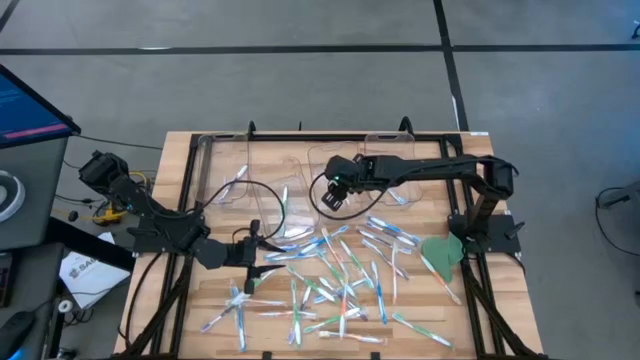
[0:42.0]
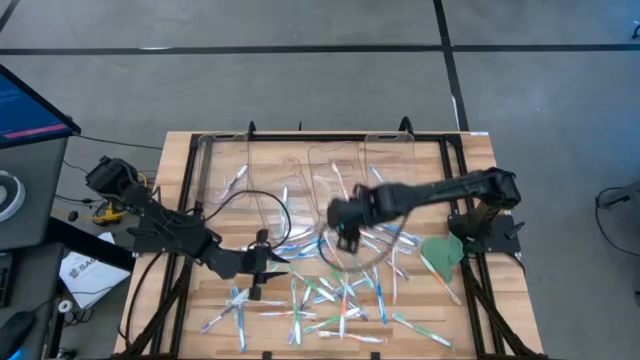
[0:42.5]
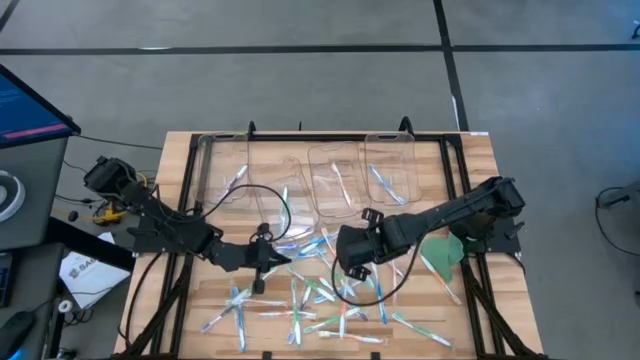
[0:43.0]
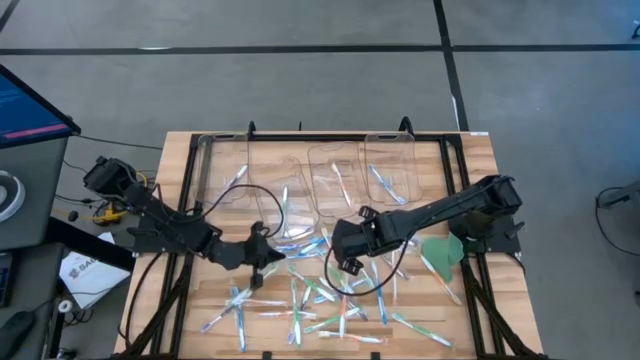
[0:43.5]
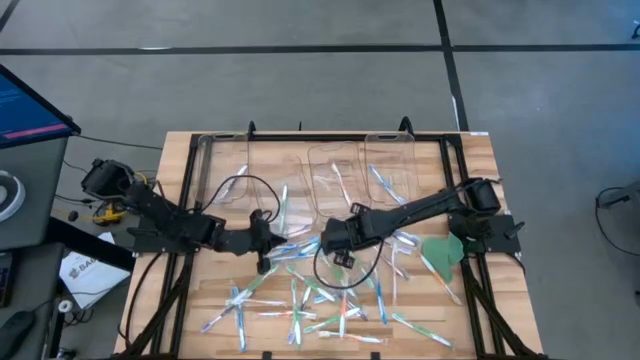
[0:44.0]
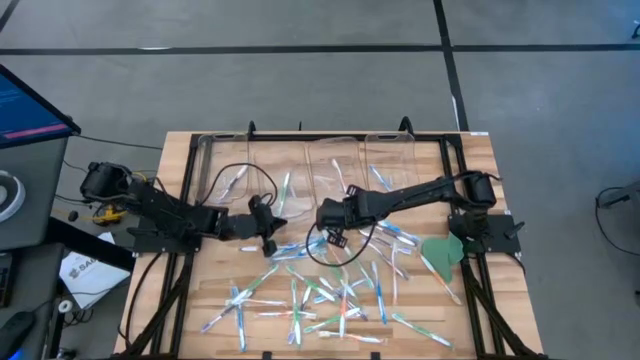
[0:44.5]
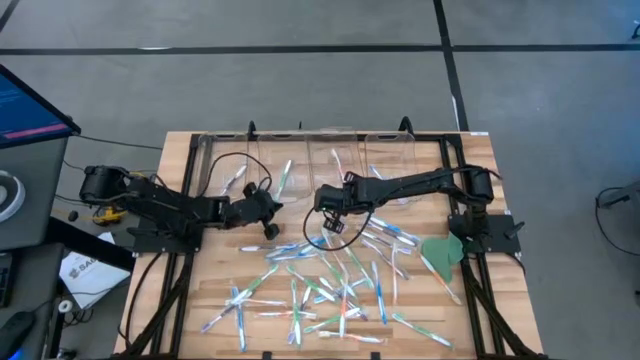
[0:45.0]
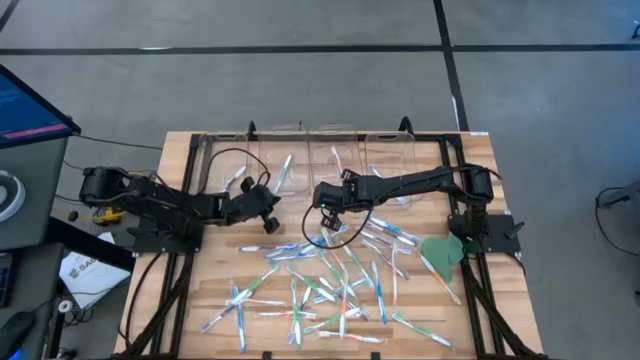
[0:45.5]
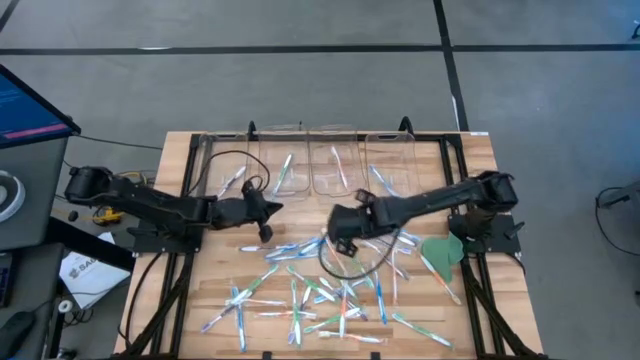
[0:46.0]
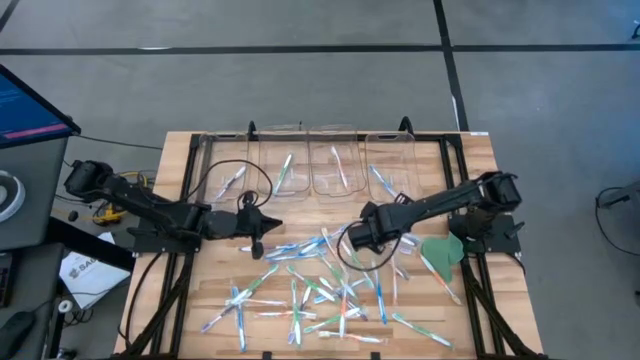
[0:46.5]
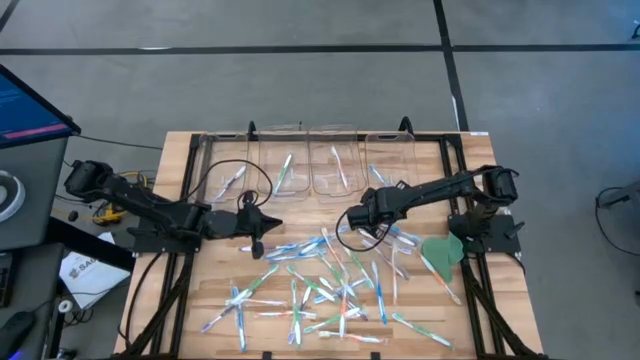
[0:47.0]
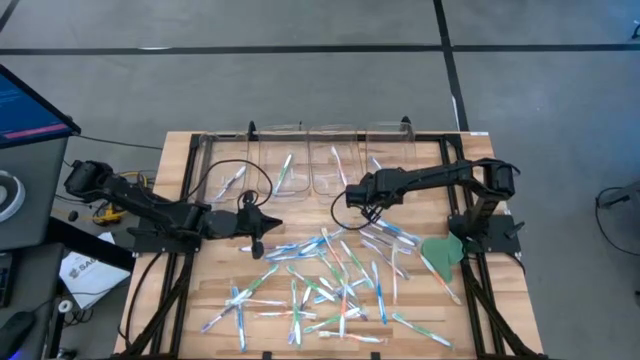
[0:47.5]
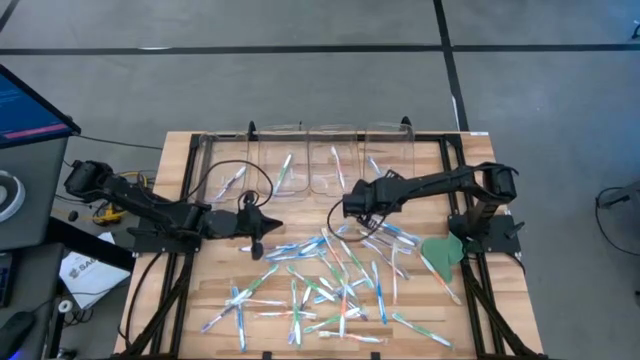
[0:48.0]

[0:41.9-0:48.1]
Task: Pick & Place Toothbrushes
Adjust the transparent bins

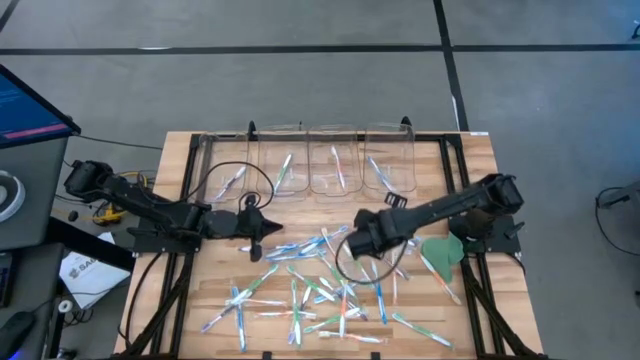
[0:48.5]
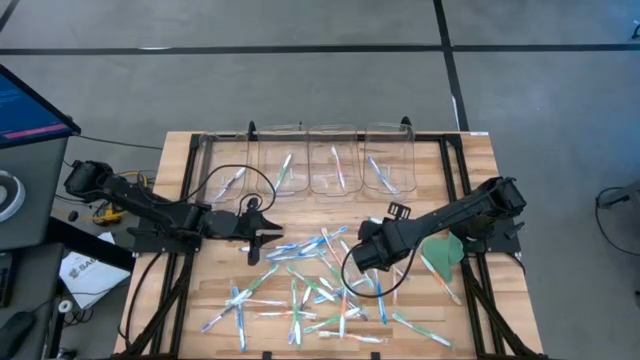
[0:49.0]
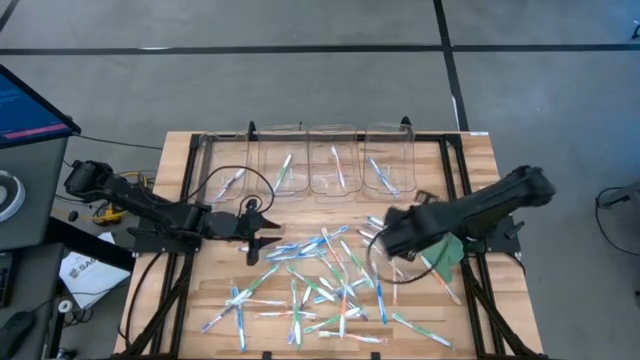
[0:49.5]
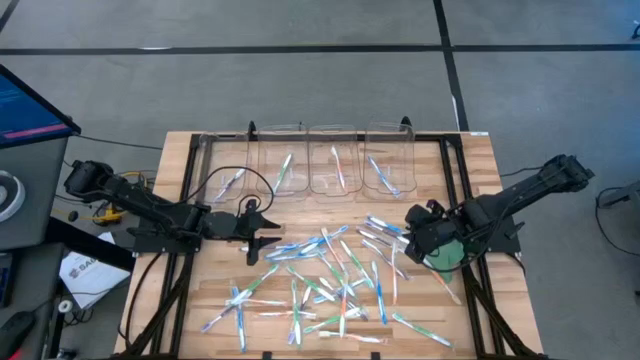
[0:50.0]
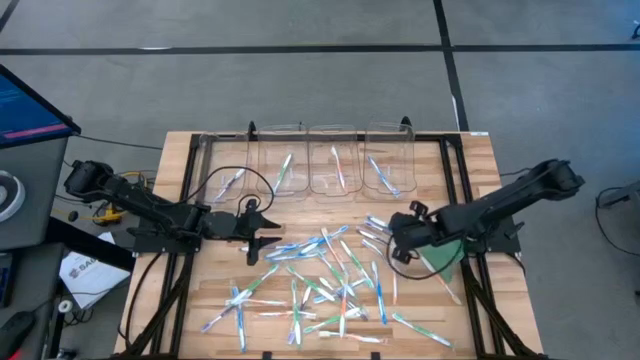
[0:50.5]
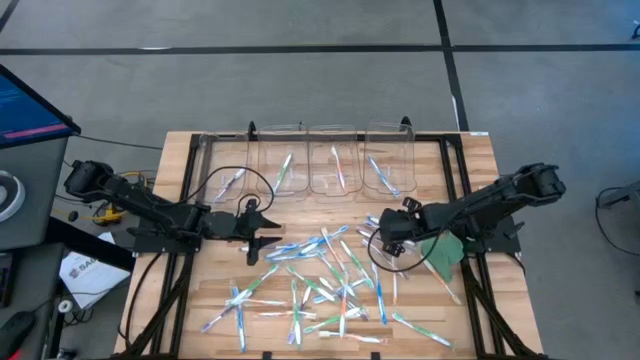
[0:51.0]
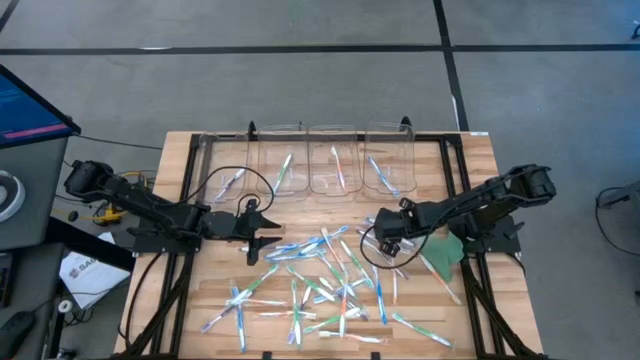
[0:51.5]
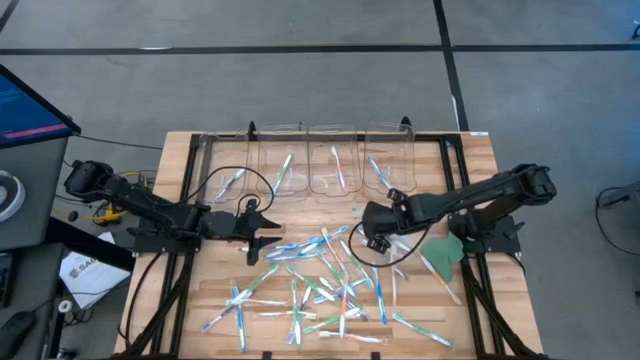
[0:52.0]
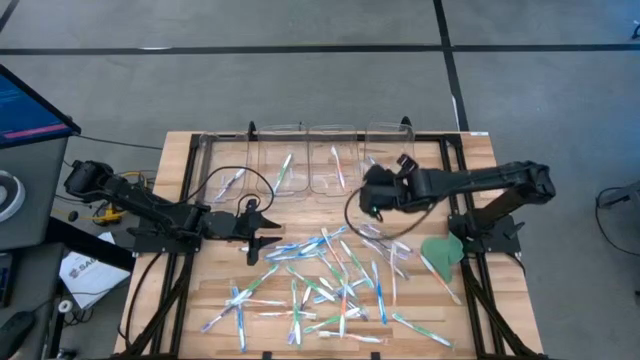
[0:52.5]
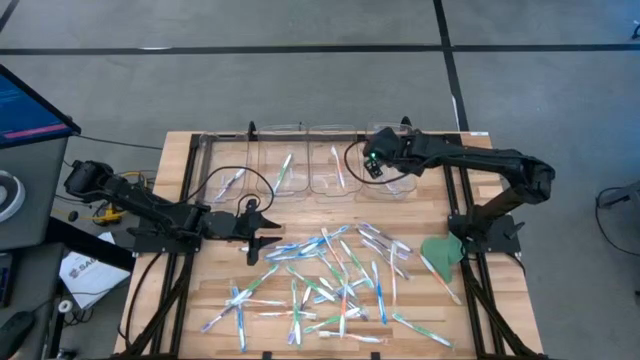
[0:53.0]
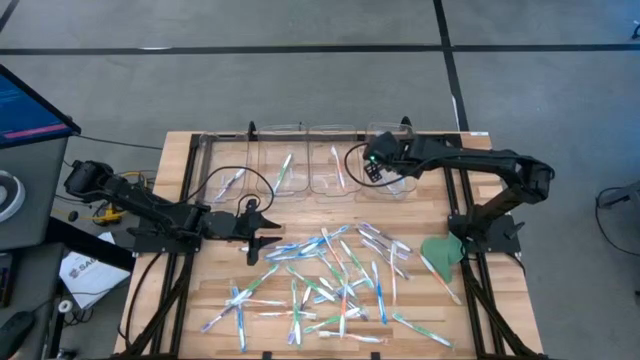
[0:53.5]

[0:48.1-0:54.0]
Put the blue toothbrush into the right transparent bin

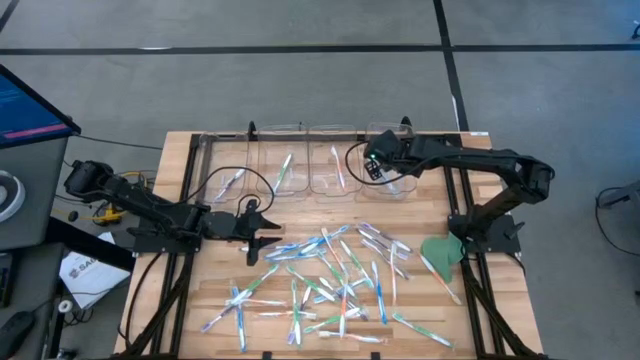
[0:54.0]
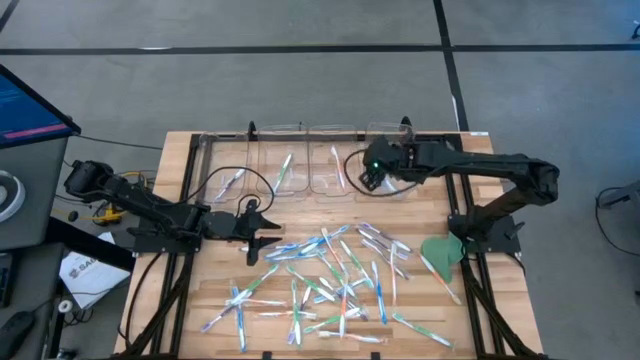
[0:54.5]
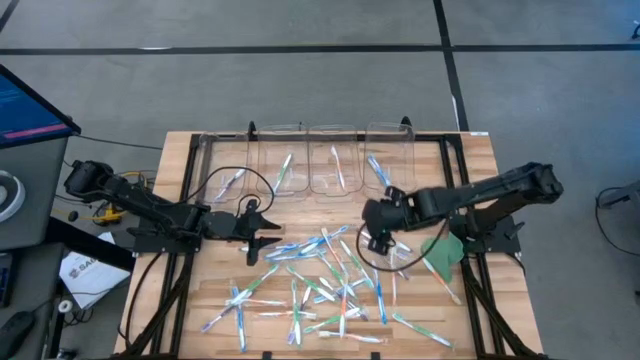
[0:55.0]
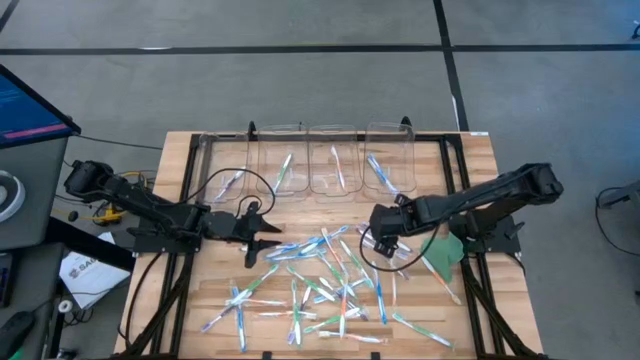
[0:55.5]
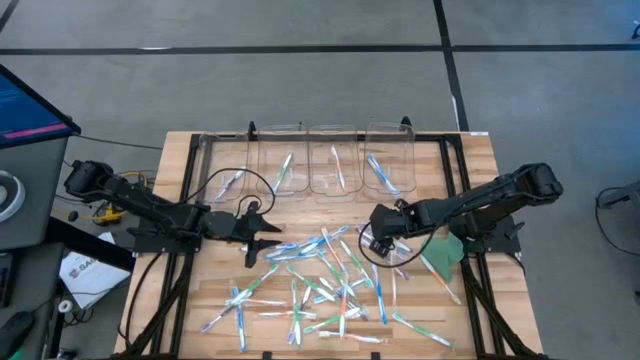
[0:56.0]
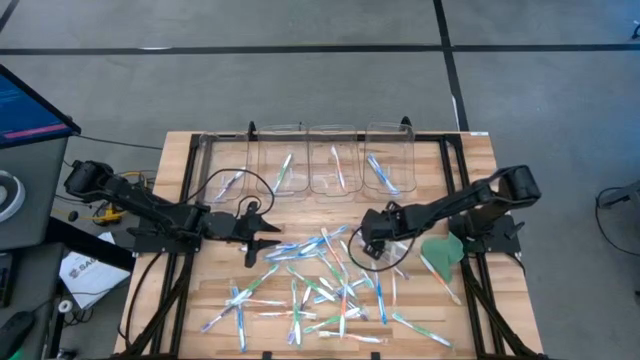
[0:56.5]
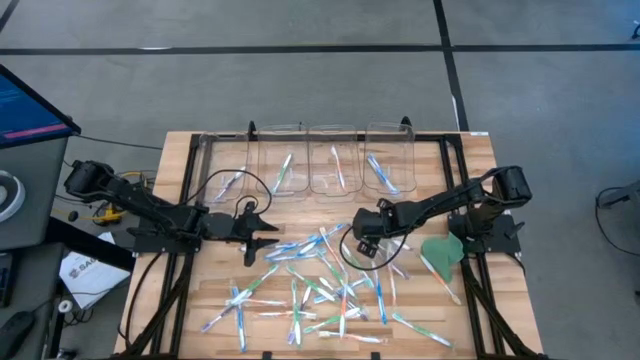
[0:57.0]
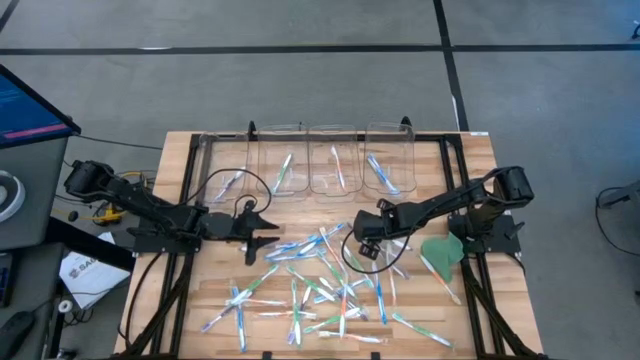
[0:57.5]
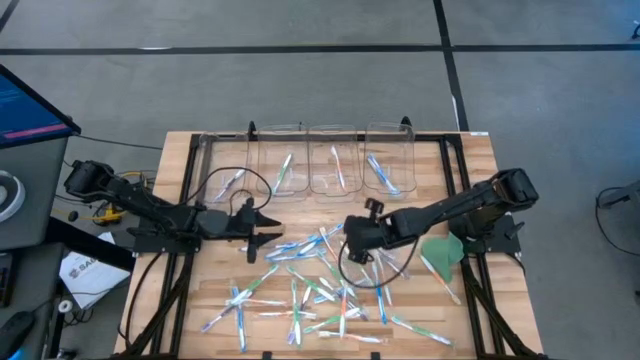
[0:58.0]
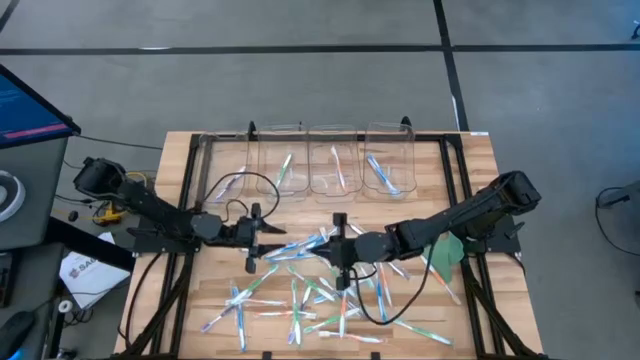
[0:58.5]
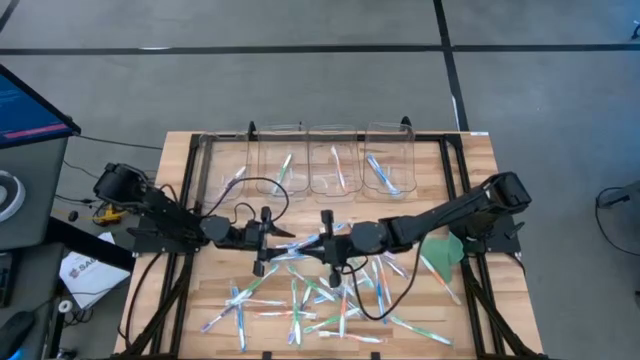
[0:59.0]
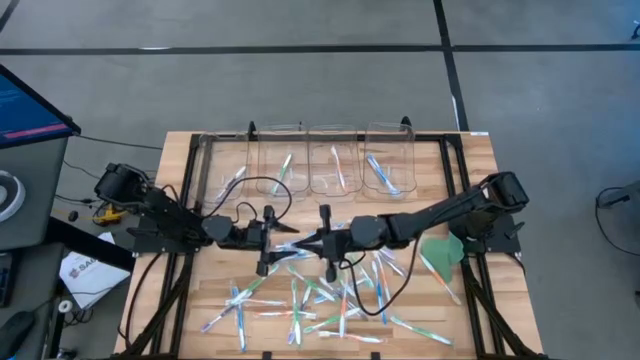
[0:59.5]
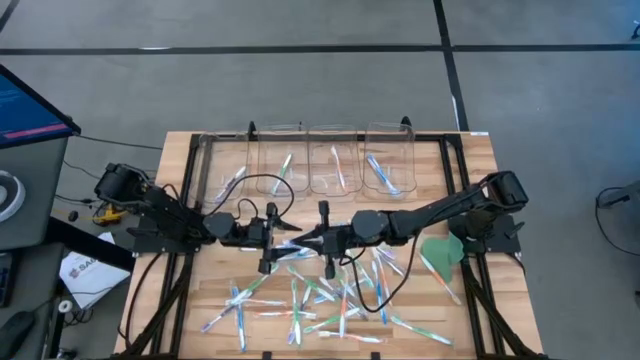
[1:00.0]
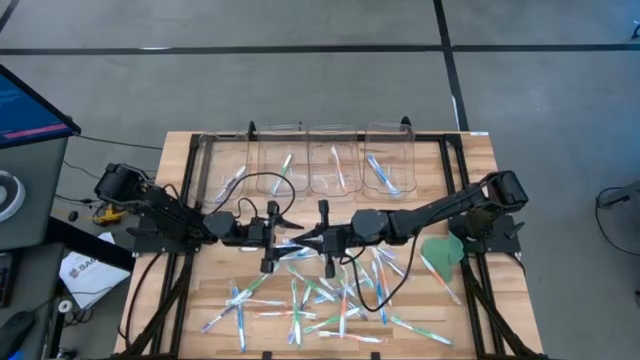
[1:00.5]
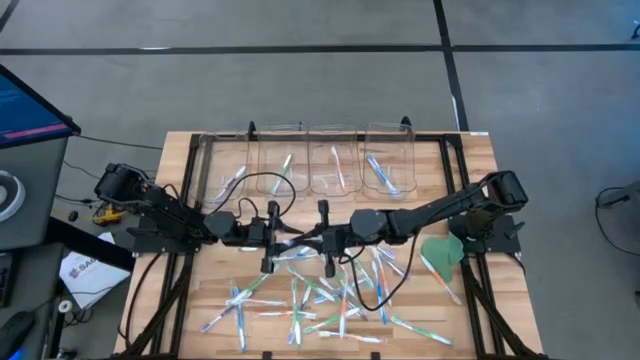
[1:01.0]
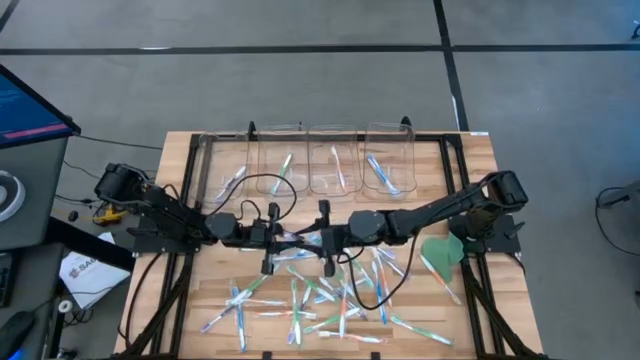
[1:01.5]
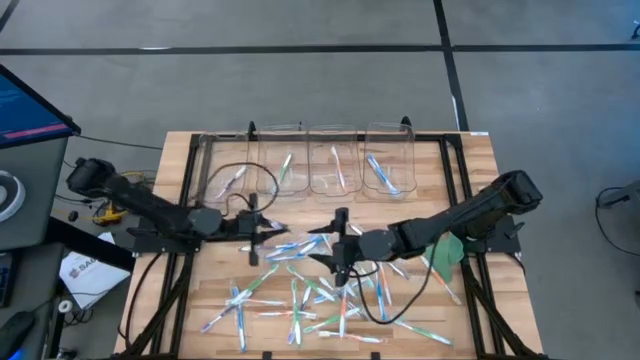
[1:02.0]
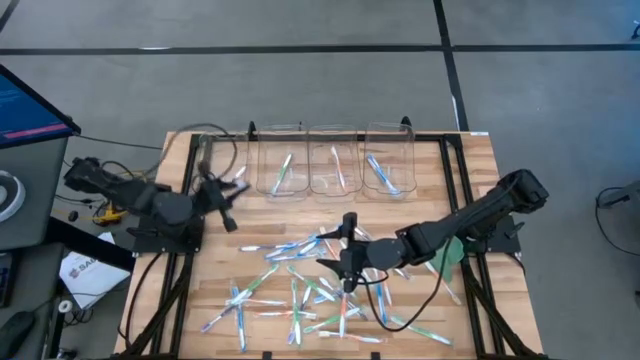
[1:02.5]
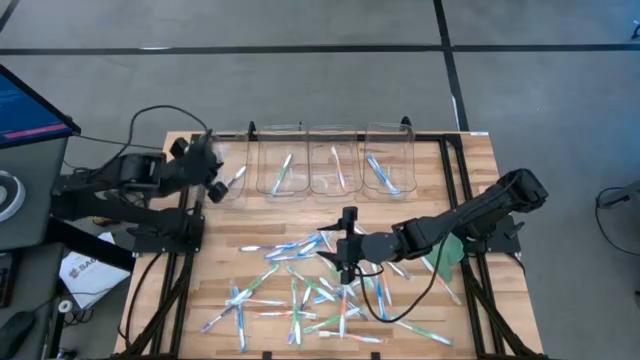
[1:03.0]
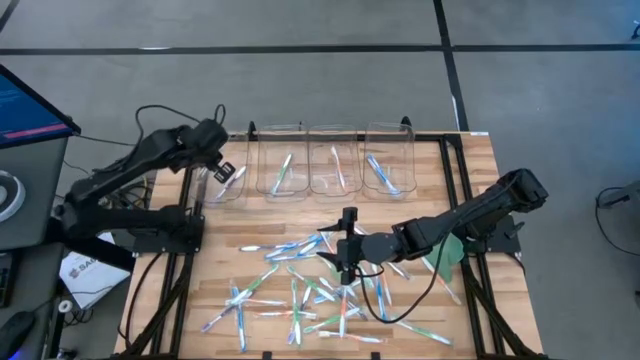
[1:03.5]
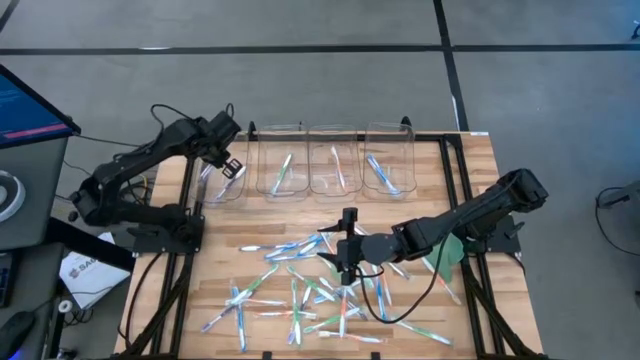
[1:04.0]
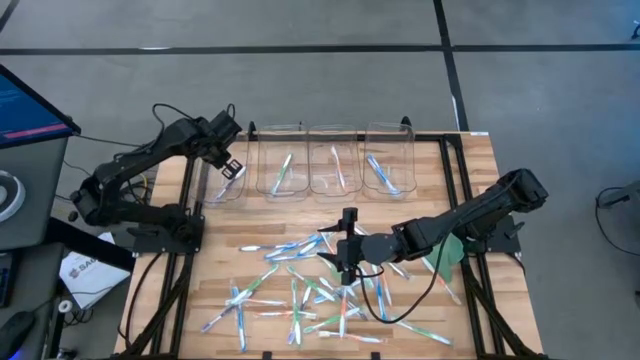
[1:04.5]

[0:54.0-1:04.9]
Put the violet toothbrush into the left transparent bin
